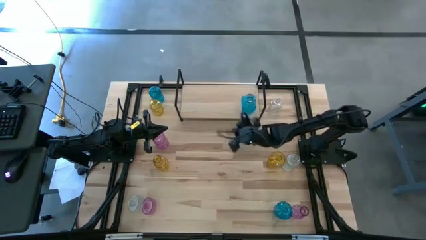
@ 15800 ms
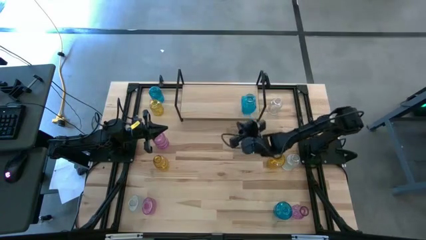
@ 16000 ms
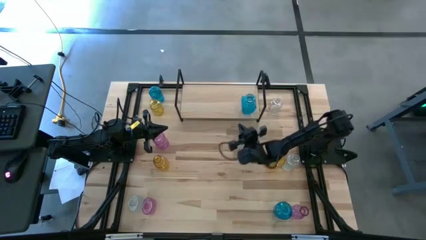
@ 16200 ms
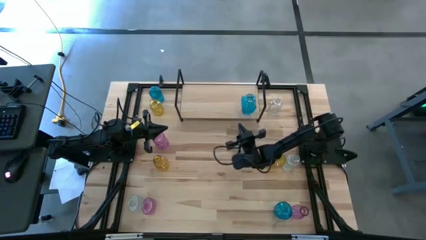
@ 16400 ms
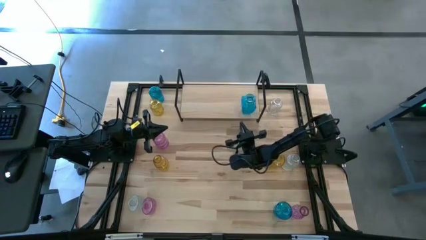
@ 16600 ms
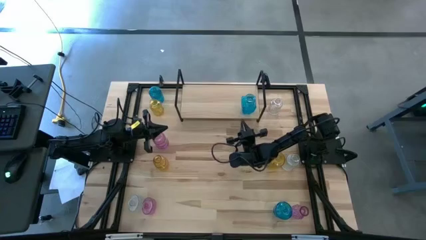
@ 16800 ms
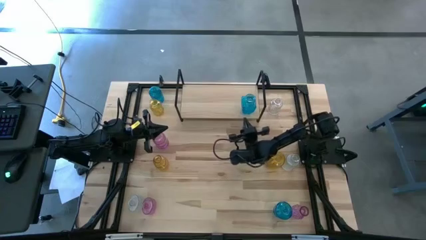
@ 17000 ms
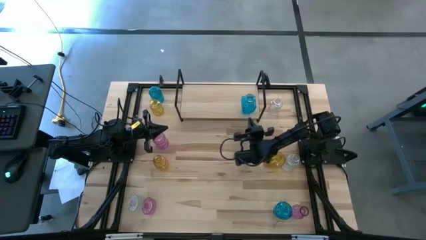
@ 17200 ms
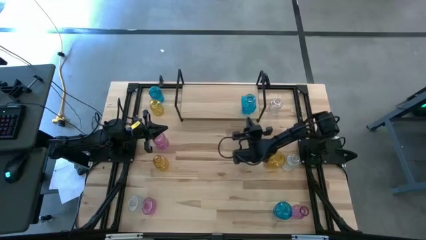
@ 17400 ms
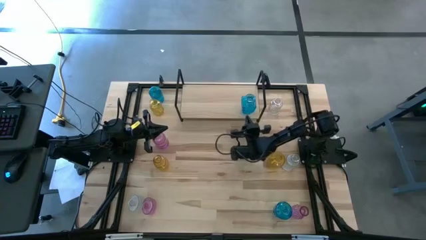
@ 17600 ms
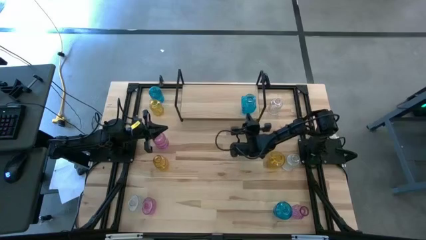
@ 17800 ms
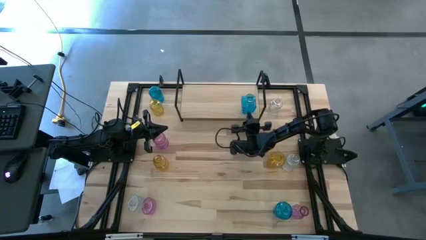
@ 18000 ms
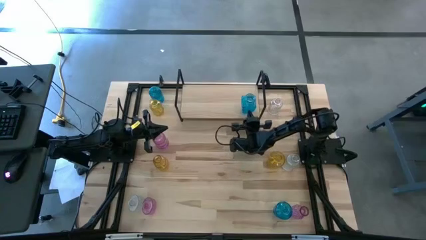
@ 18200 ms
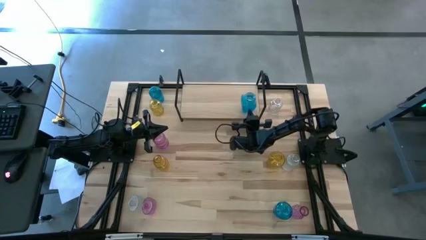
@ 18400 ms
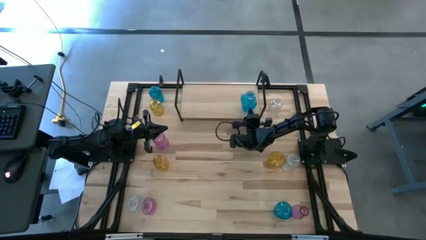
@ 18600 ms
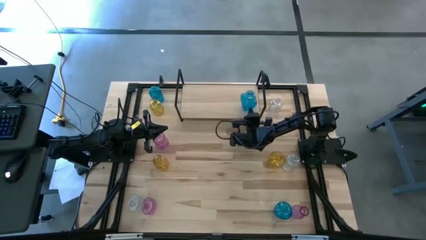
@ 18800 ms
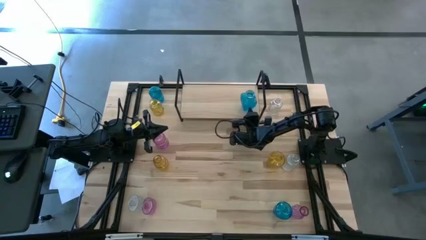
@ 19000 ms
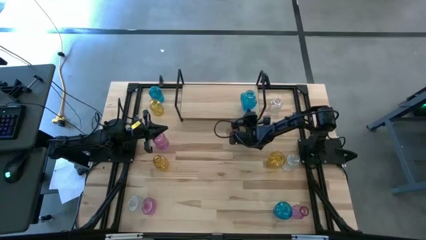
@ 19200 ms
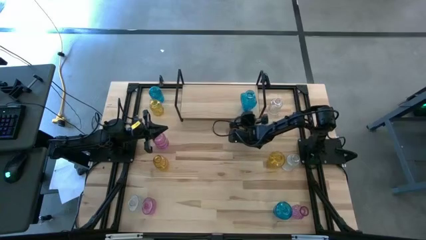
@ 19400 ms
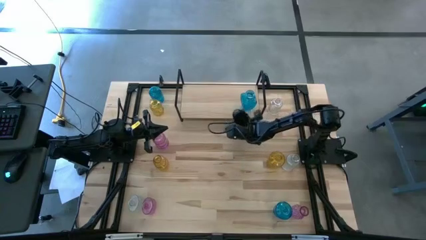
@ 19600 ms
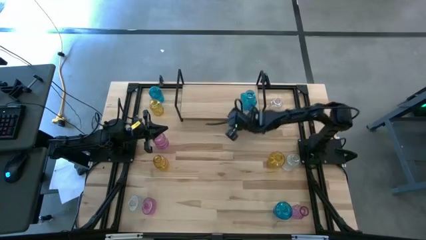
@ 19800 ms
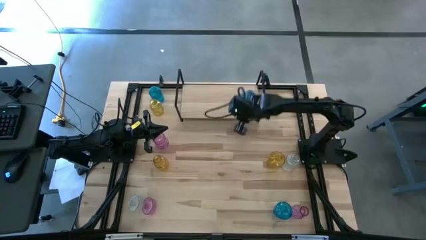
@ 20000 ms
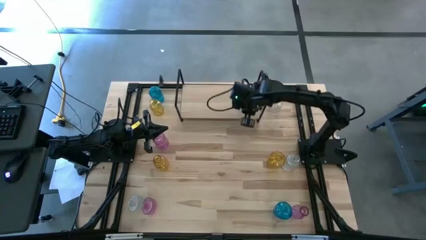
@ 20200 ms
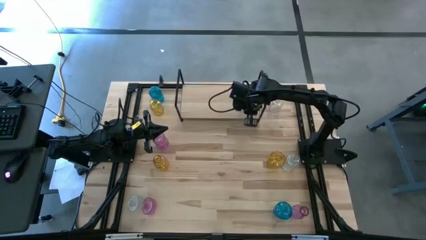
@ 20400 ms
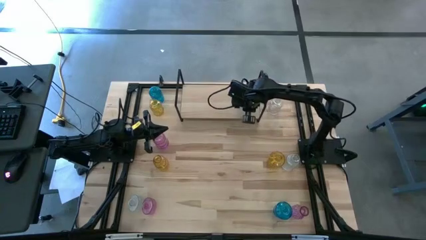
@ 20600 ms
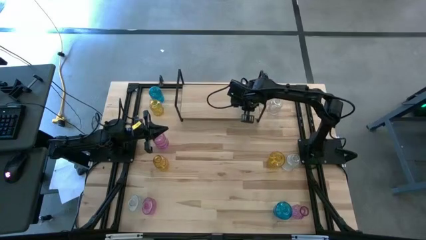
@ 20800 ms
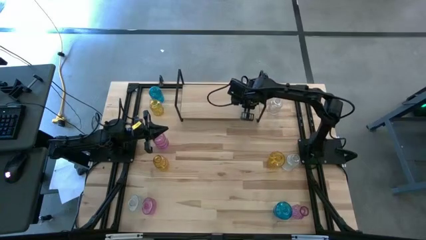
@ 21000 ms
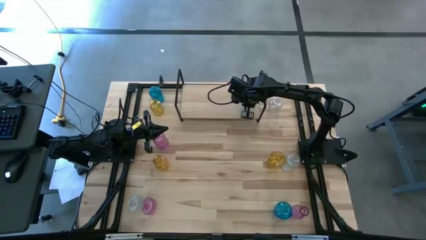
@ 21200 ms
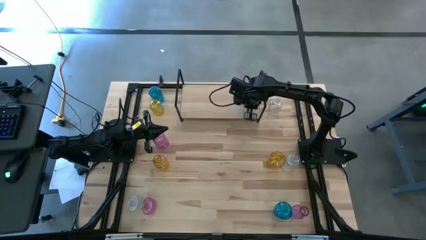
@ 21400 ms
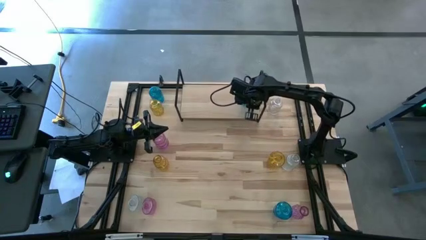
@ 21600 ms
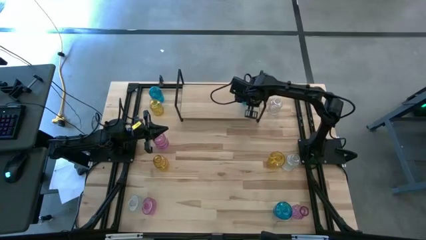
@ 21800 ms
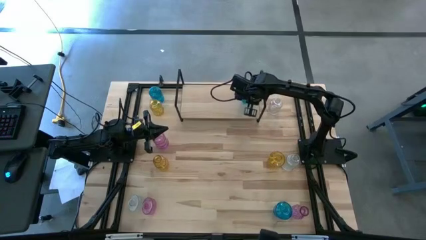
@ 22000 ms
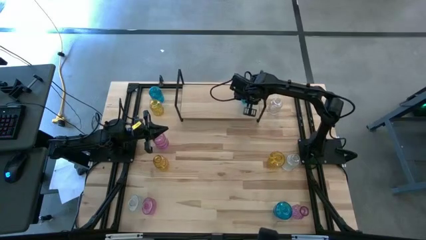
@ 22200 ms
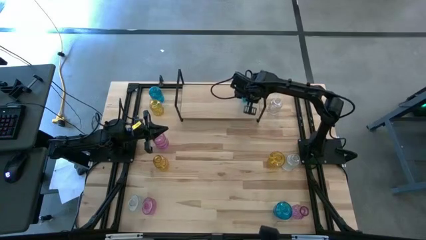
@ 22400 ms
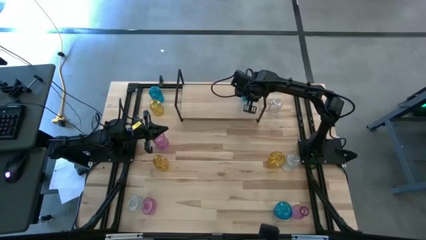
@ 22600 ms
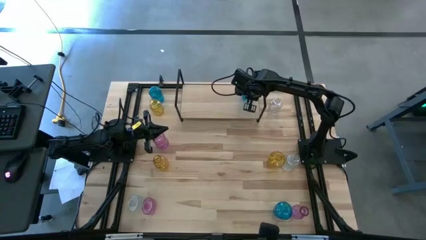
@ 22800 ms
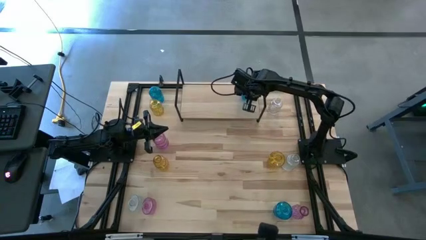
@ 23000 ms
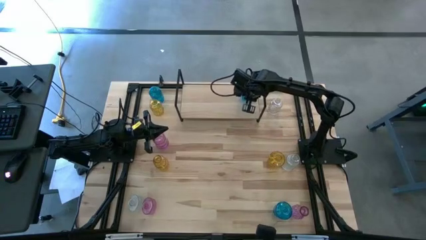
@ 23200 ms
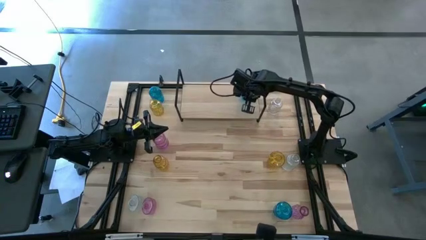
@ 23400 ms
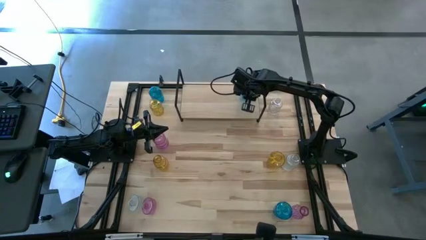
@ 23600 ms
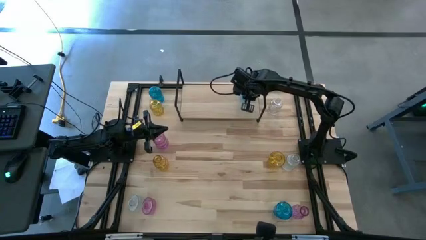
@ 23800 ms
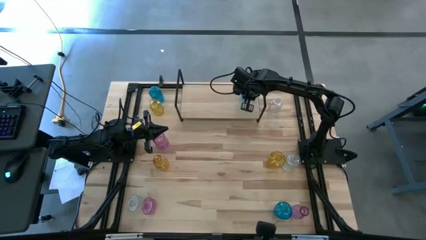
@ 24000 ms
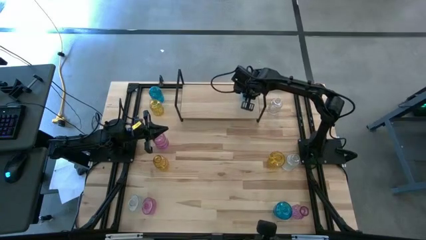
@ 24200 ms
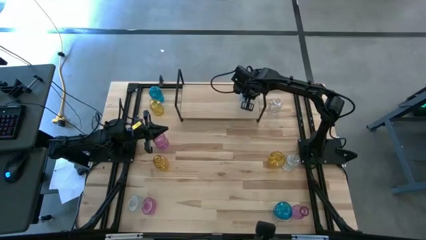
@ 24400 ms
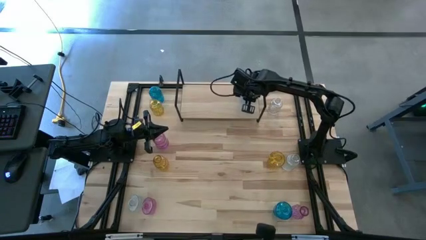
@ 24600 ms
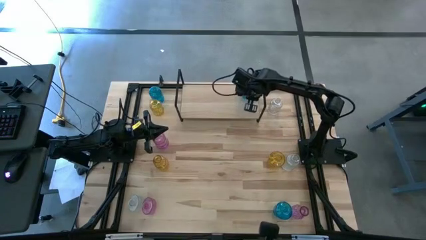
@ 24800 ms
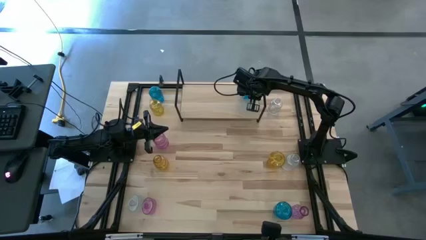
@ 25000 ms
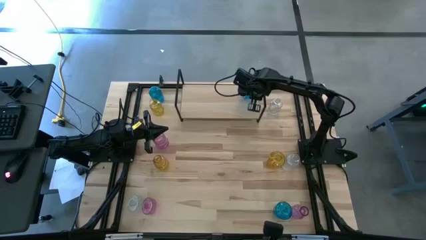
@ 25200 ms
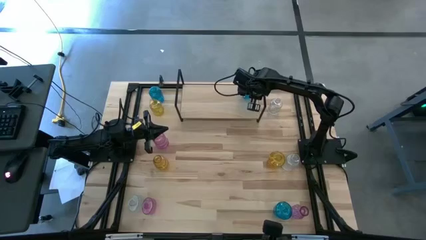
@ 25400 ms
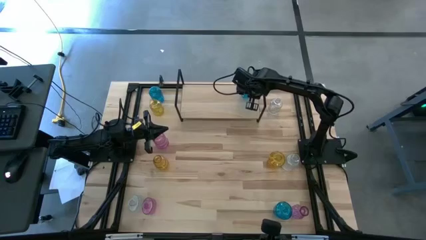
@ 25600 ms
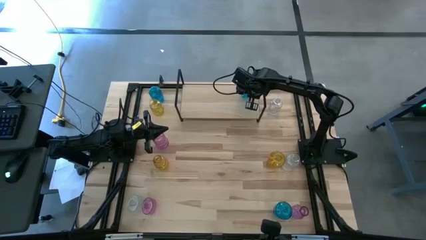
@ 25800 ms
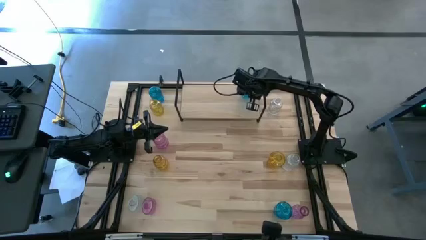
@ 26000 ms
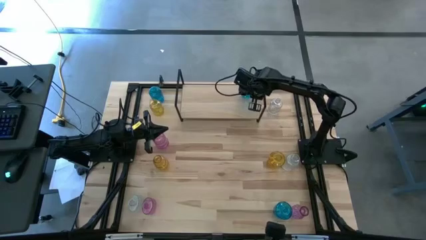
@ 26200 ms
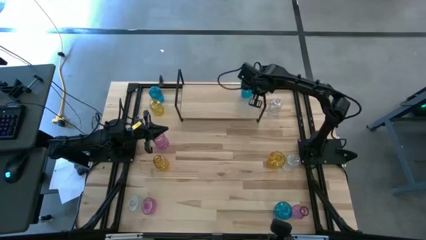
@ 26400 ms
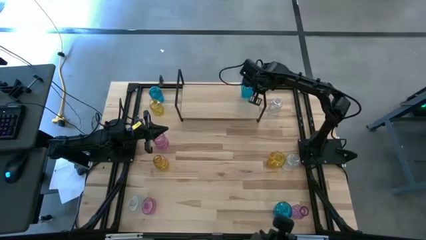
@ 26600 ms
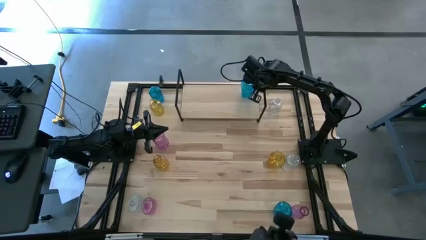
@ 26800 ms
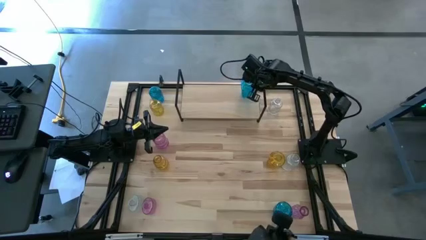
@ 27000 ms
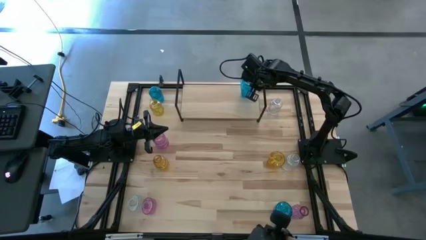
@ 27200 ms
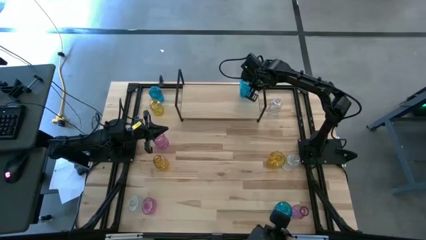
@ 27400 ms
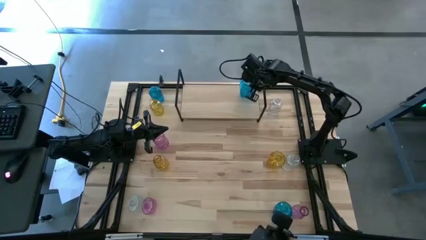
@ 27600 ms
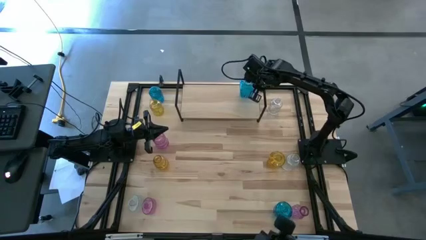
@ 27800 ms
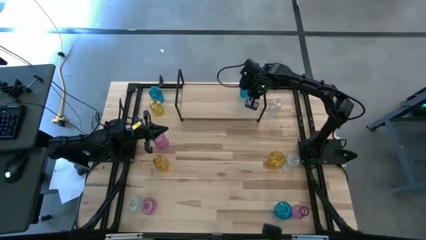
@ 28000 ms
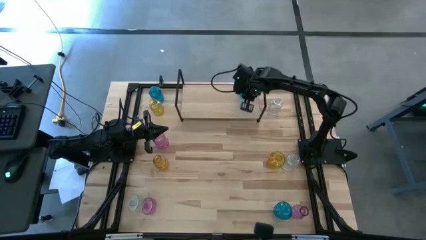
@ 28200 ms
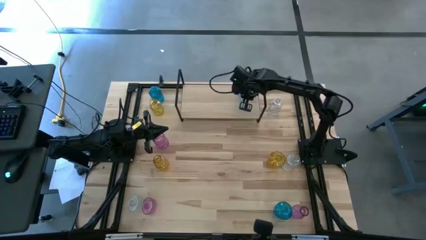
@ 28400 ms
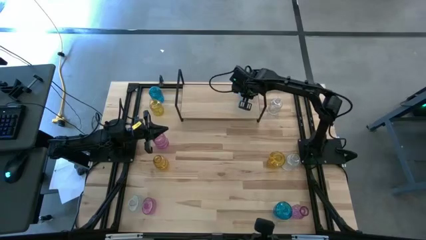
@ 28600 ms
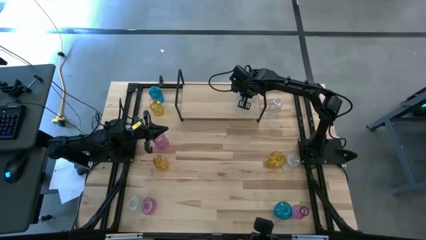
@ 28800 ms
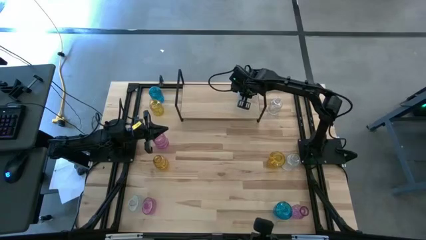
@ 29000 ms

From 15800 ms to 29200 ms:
Task: sort vases onto shelf
Put the top right blue vase on the shelf

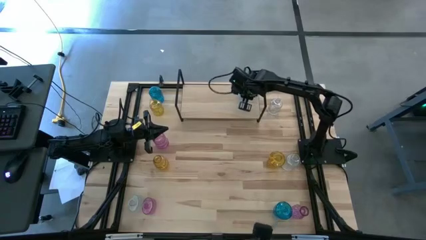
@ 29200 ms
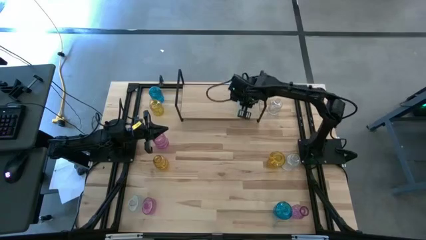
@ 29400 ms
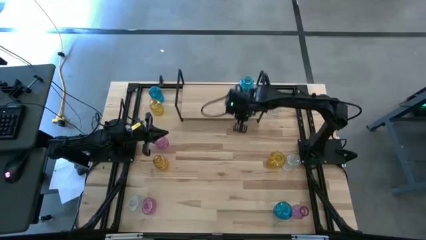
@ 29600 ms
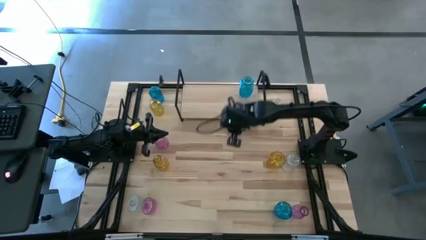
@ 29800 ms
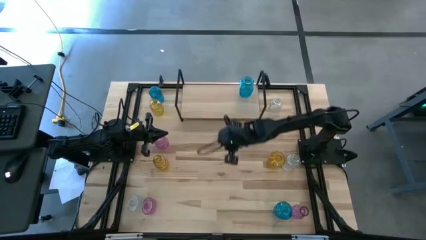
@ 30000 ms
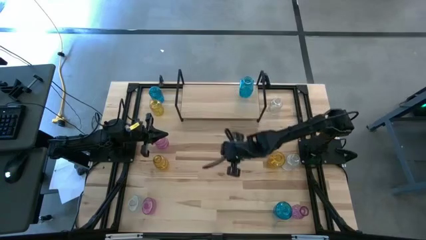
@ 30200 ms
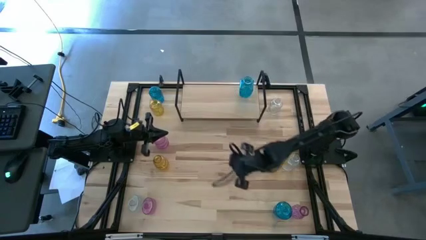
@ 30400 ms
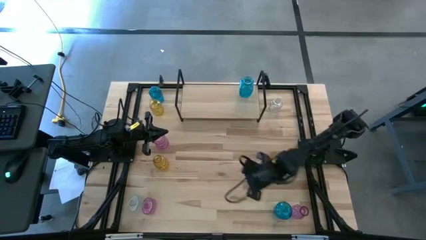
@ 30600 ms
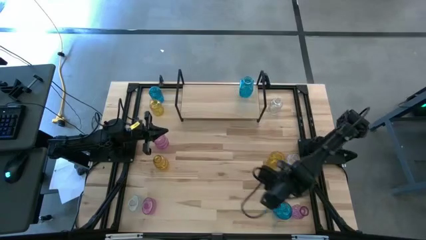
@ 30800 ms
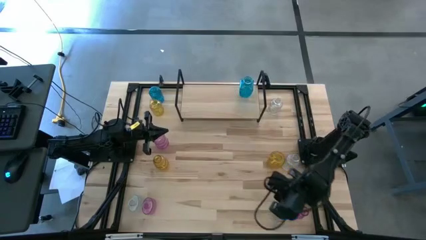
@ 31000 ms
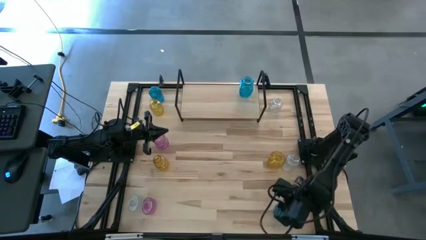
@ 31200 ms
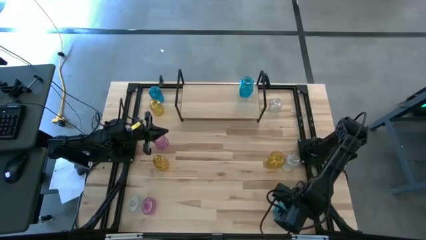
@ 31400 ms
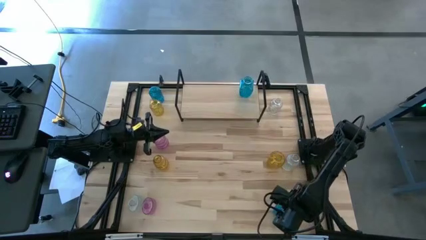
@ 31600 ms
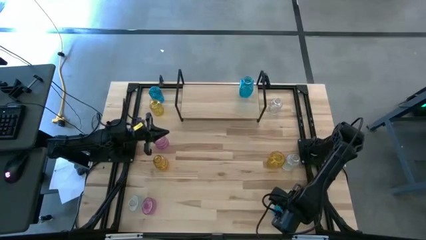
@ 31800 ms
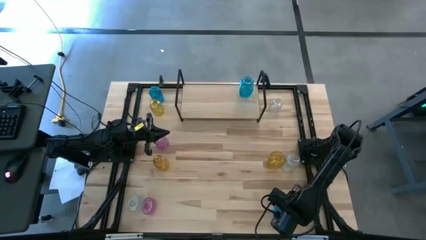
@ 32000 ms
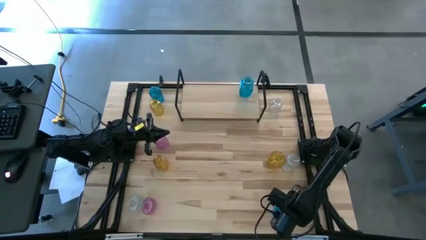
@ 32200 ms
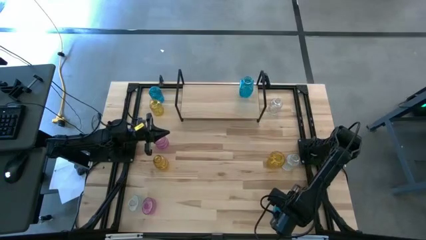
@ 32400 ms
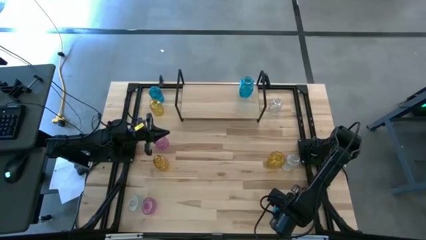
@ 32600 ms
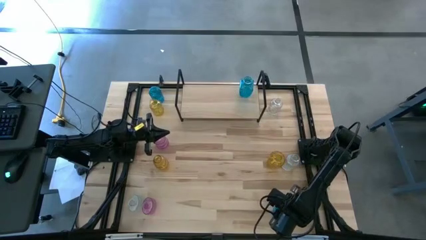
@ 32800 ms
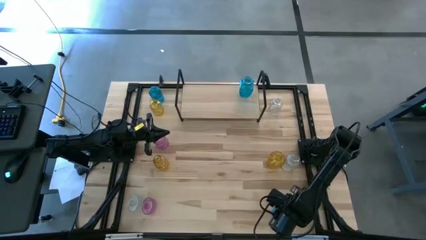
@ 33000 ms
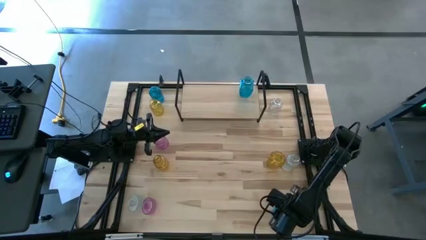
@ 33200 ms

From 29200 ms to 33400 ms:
Put the bottom blue vase aligned with the other blue vase on the shelf
